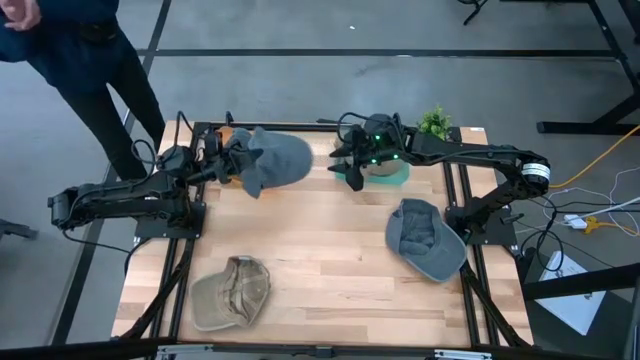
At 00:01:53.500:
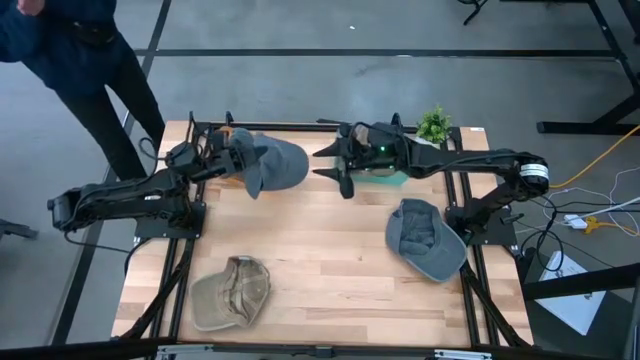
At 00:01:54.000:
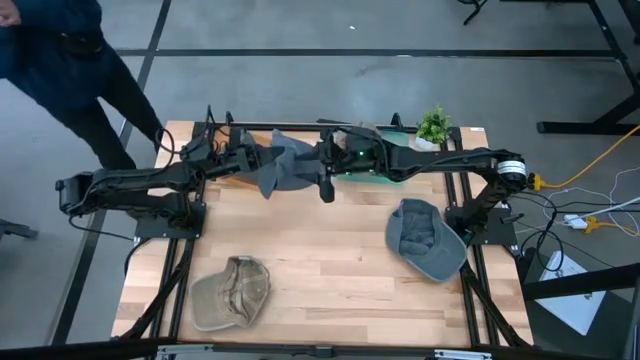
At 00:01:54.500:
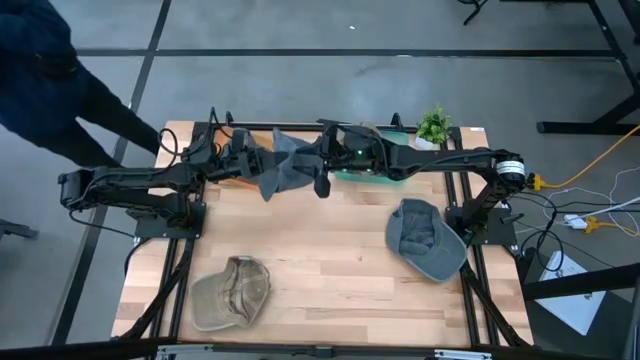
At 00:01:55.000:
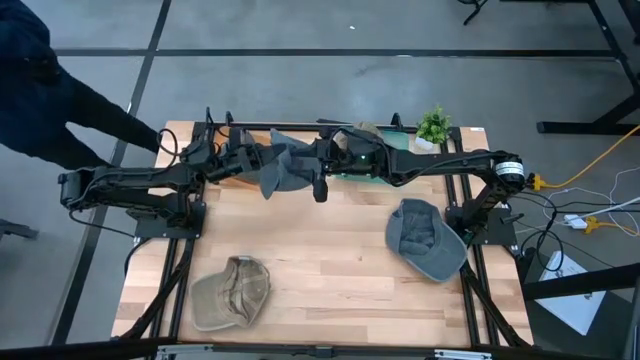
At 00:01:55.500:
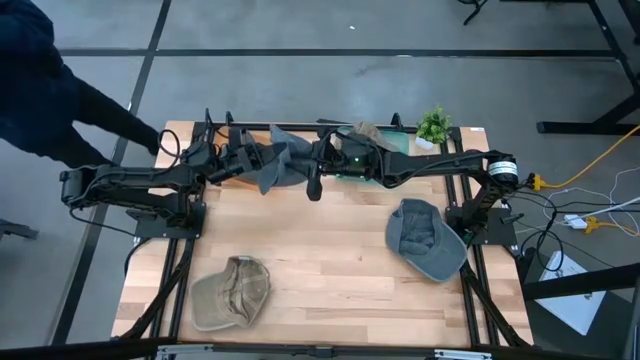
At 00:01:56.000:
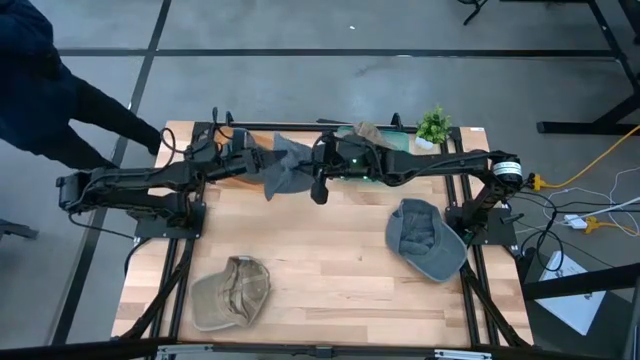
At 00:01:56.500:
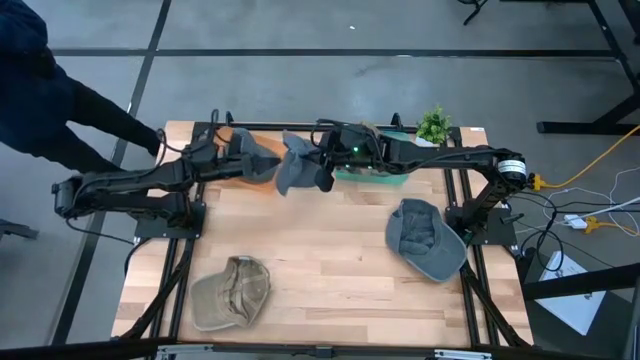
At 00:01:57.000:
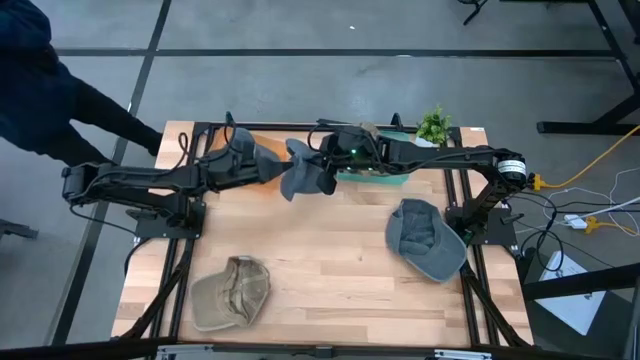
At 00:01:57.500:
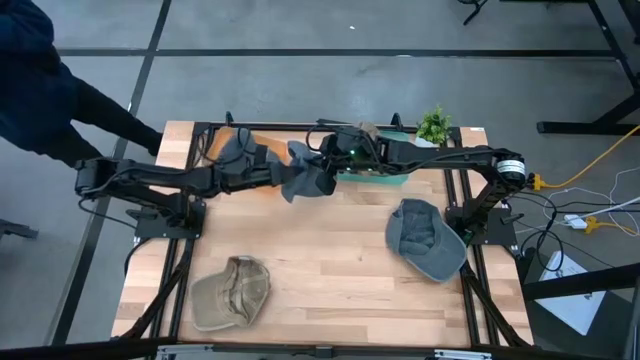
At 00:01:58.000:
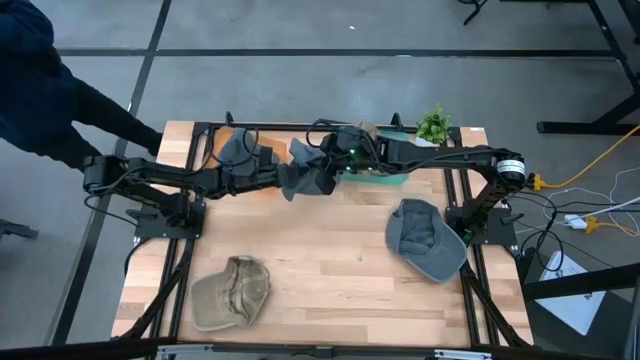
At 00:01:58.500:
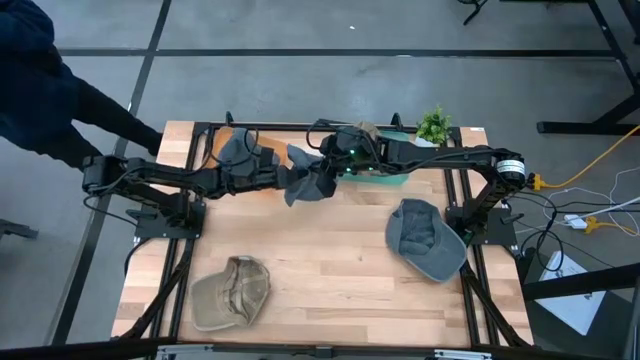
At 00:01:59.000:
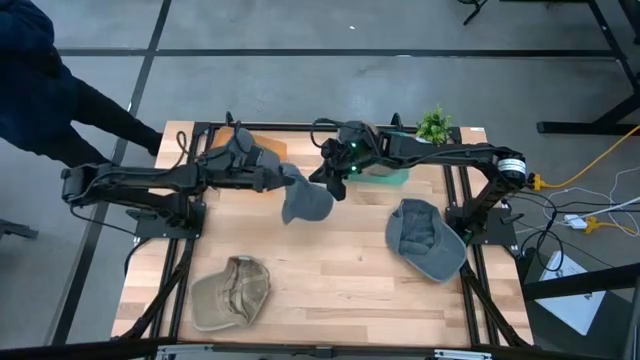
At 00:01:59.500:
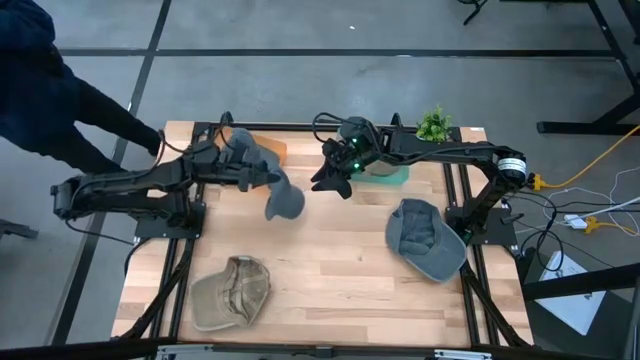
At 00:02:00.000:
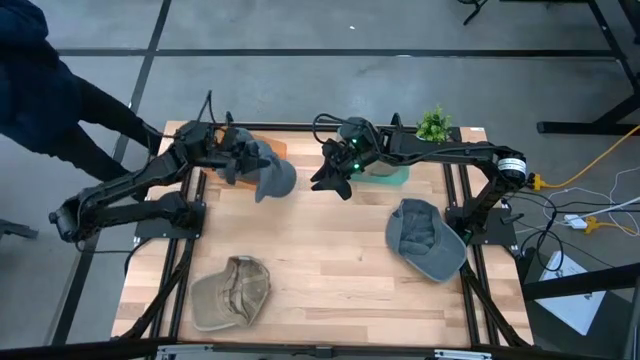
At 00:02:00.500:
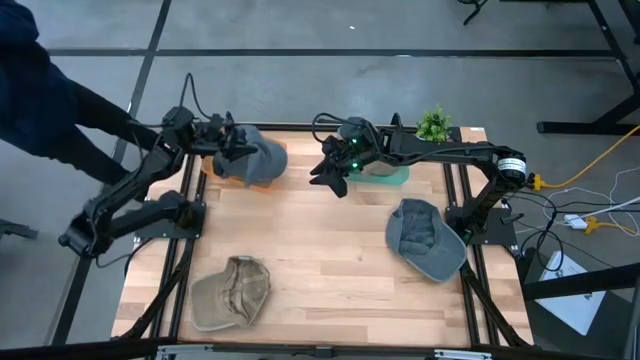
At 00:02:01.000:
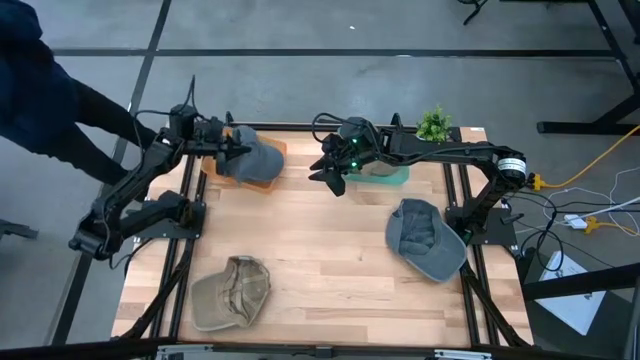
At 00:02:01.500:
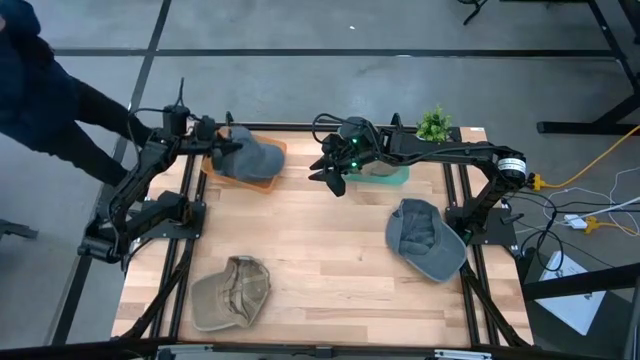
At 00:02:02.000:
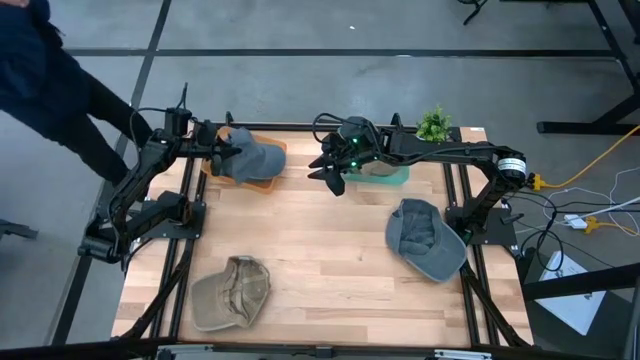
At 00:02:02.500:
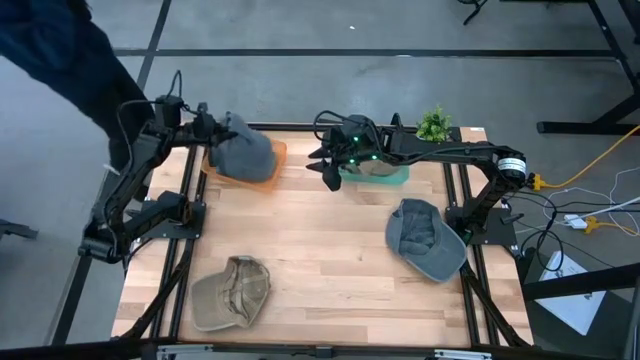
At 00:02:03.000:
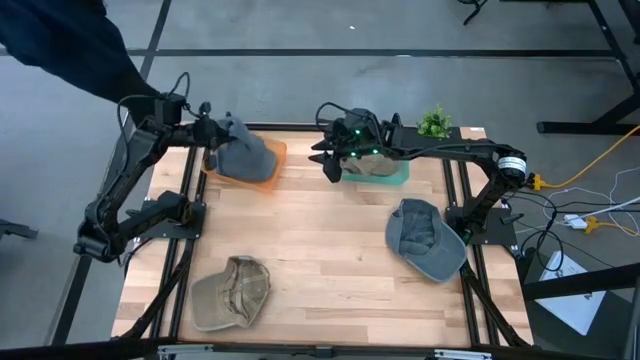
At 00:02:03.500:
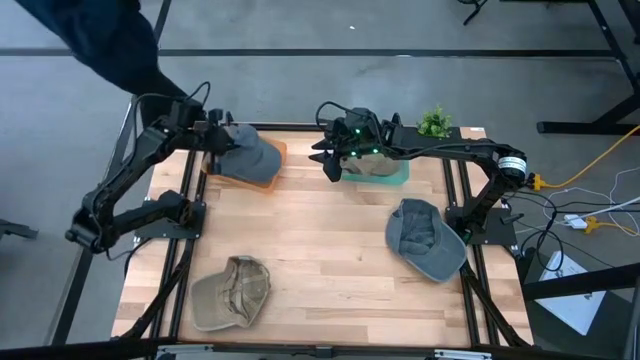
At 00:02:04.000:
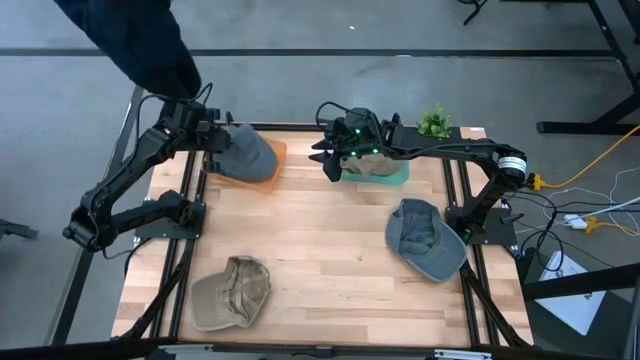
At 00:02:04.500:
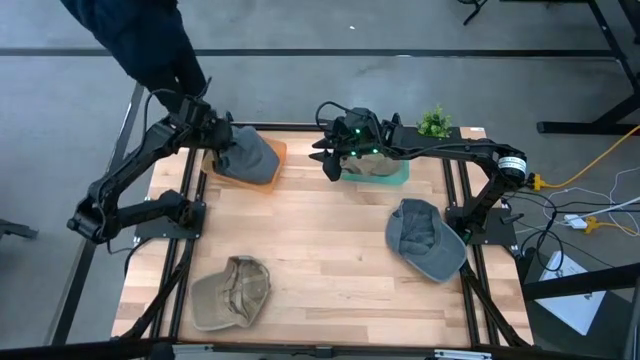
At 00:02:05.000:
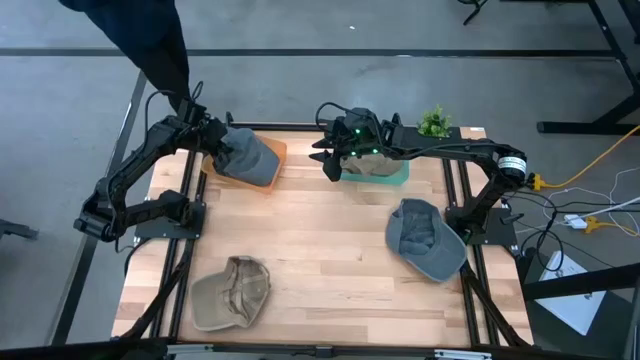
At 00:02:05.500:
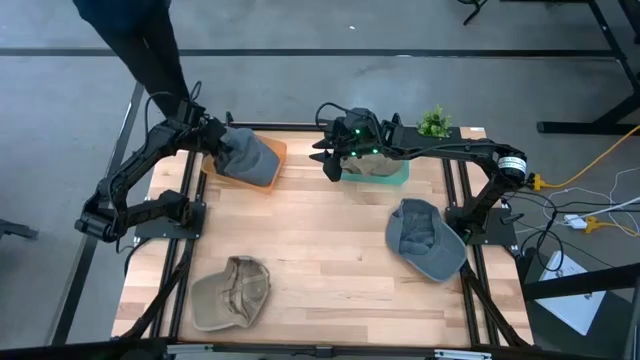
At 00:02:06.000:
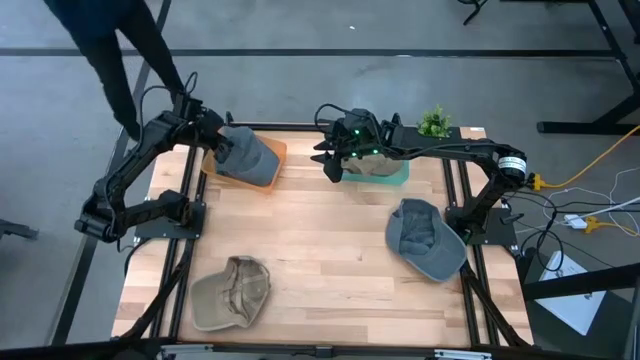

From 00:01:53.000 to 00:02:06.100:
Task: Pick & Place hat
Put the left gray cap into the orange bin

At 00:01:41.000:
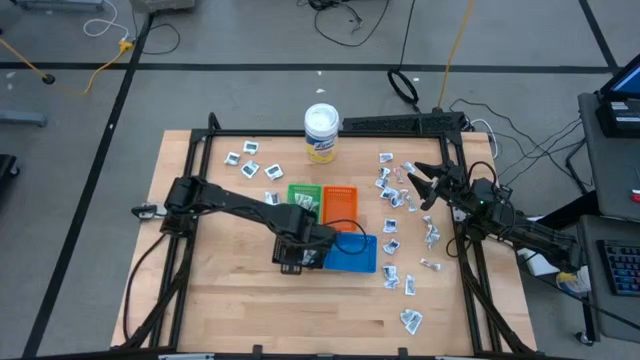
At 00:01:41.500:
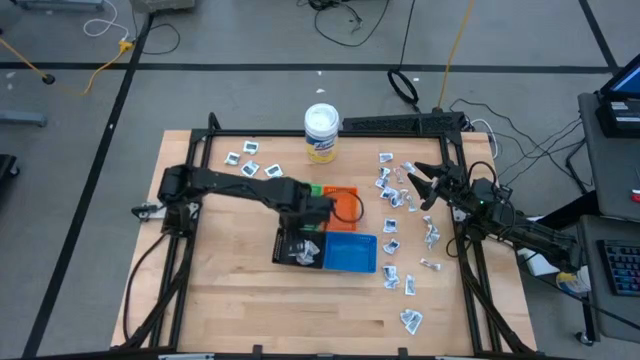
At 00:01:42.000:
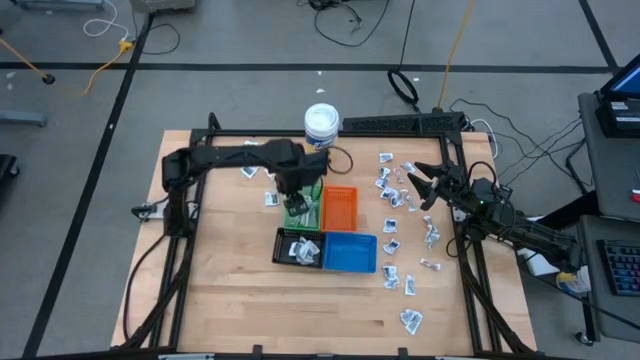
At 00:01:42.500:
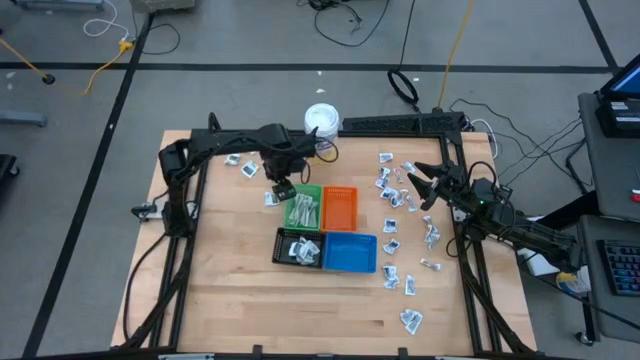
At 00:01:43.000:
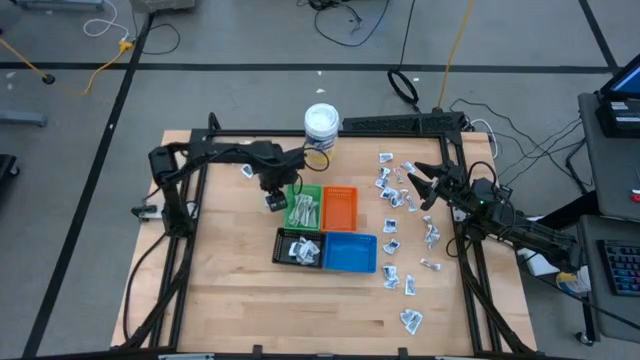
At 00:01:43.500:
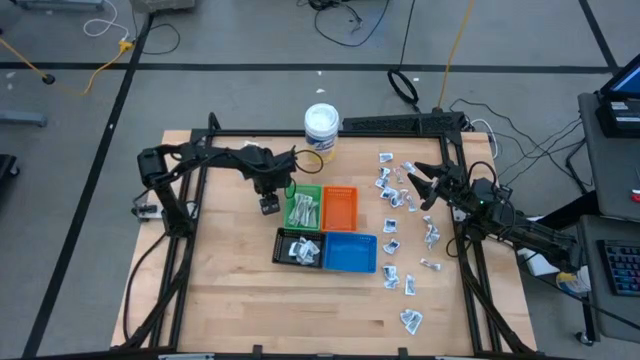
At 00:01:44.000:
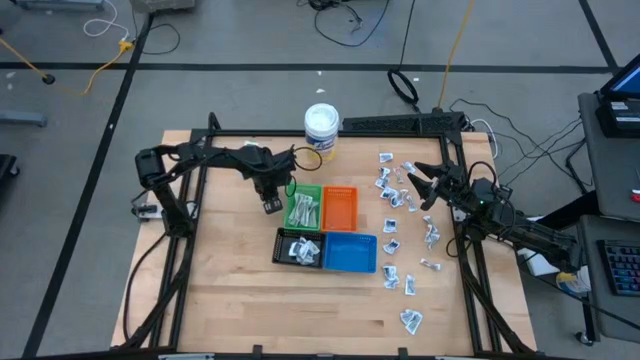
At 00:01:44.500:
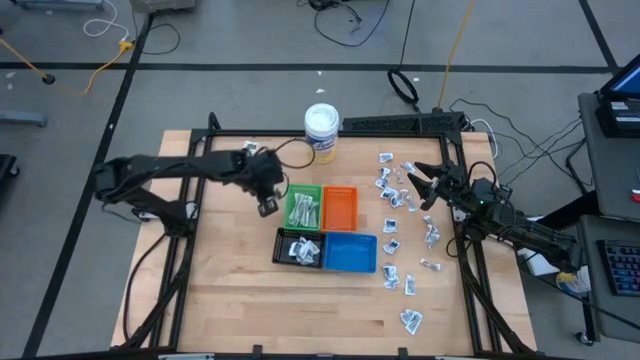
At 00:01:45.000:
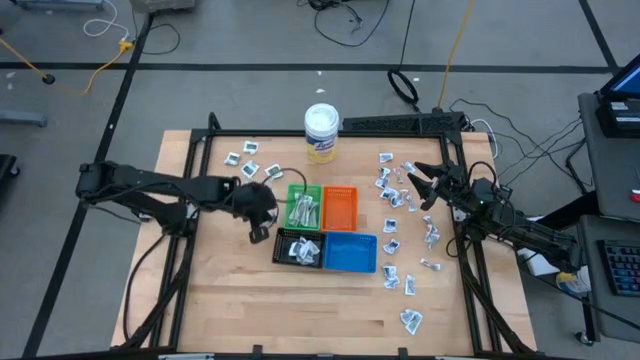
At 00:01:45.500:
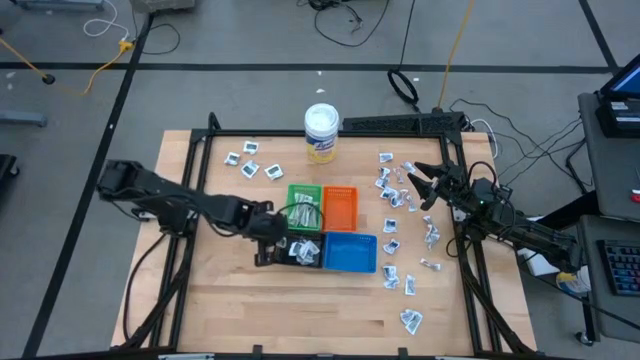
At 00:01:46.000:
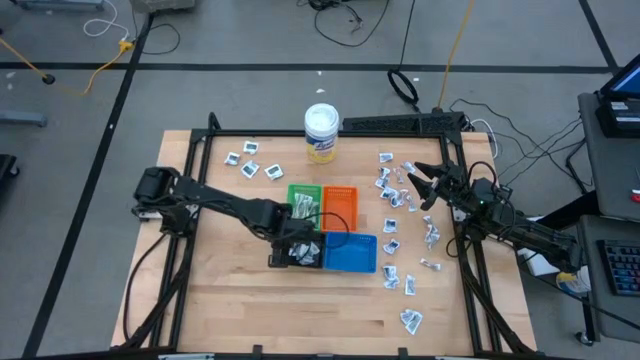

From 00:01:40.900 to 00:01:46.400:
Task: Pick & Place First Aid Supplies
Put the towelette pack into the black bin
